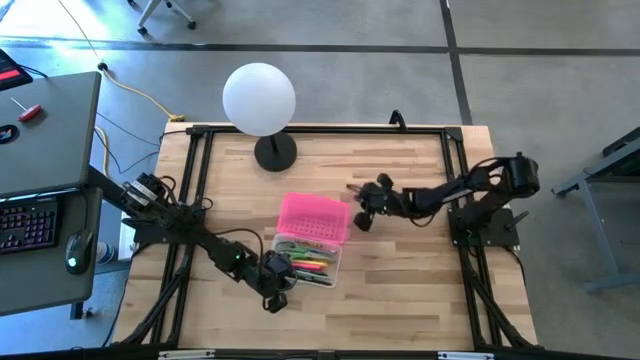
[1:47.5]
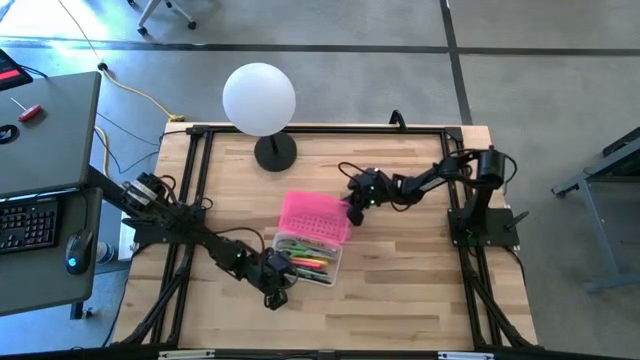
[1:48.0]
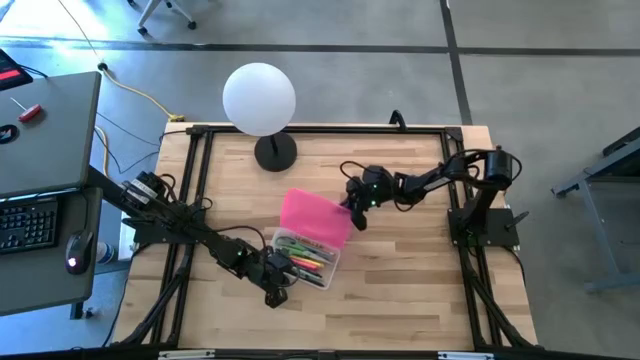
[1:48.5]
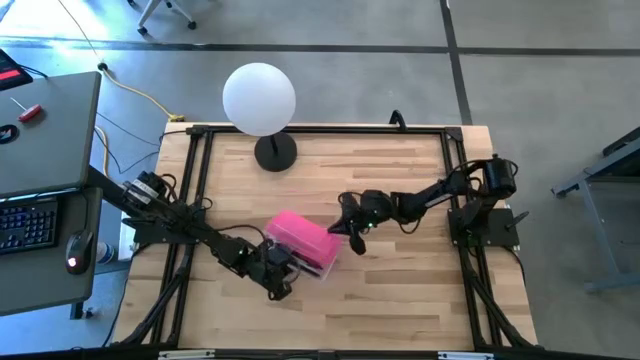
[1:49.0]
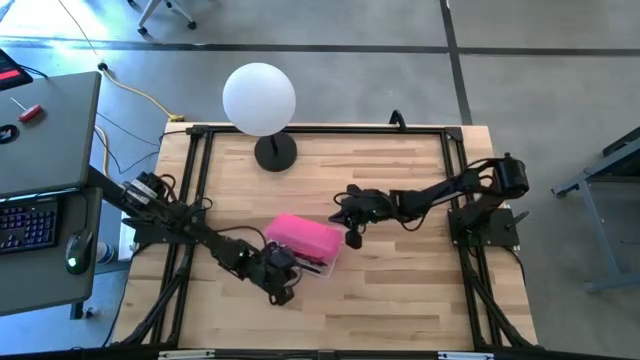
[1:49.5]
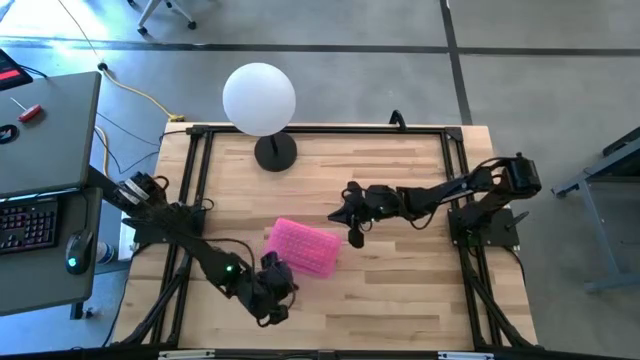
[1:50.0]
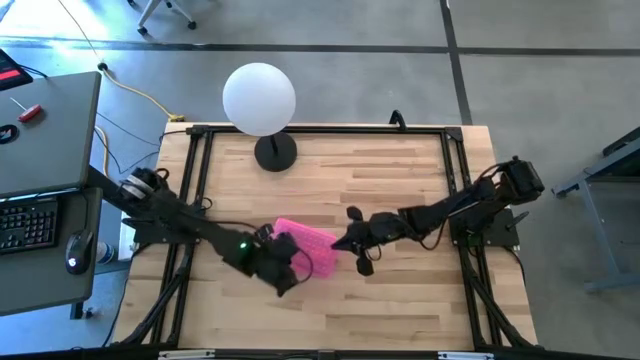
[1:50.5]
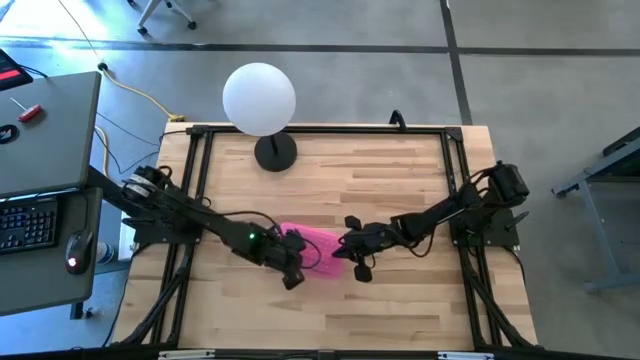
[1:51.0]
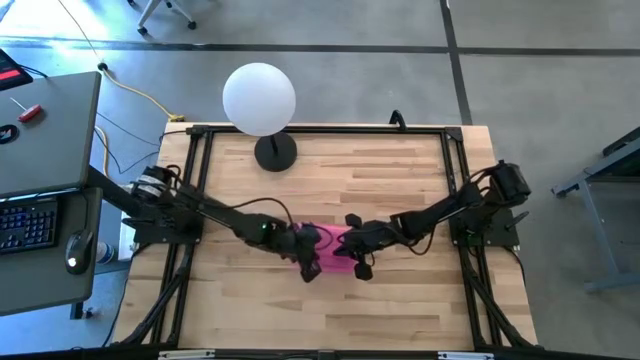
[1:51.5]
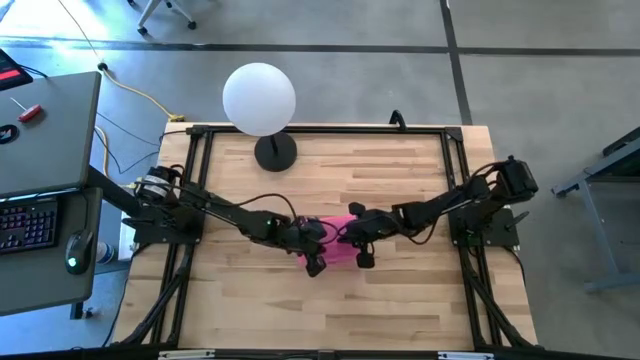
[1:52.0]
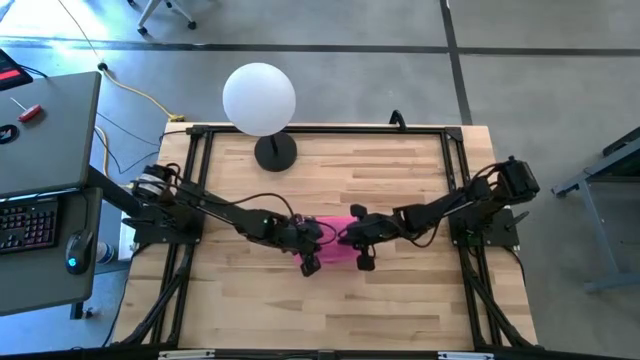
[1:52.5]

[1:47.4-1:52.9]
Task: Pick & place school supplies into a supply box
Close the pink supply box

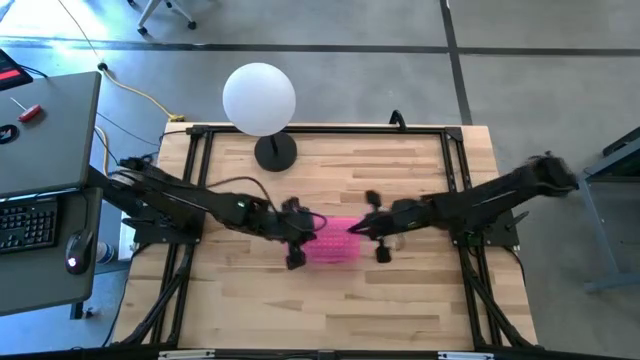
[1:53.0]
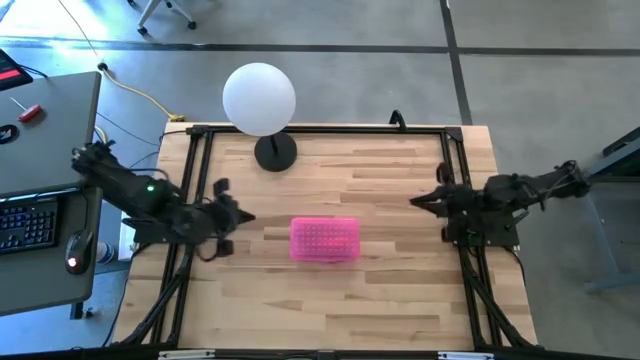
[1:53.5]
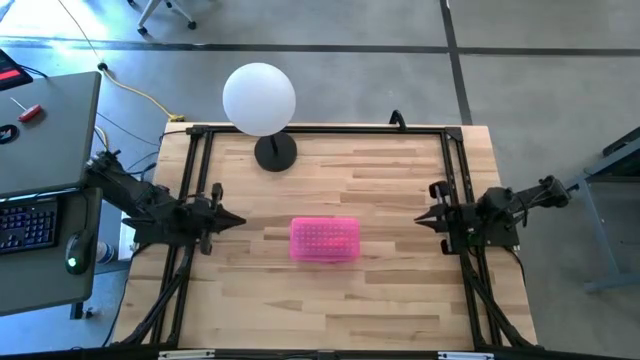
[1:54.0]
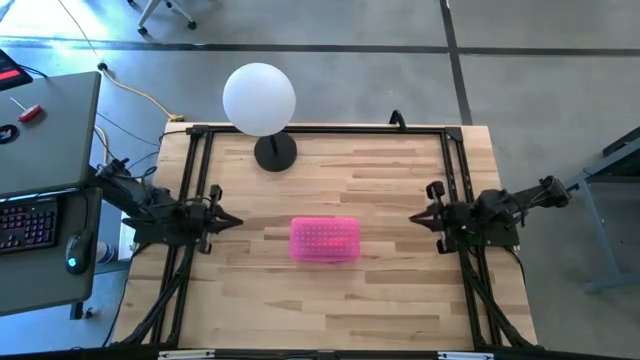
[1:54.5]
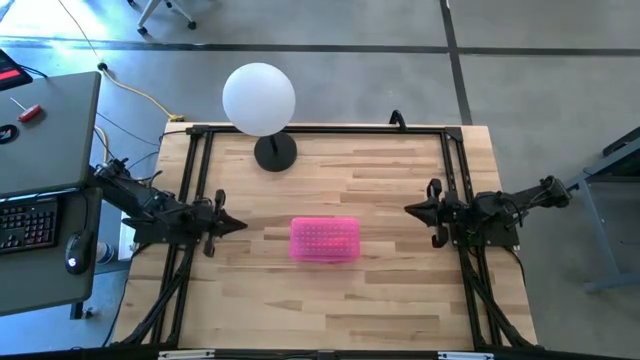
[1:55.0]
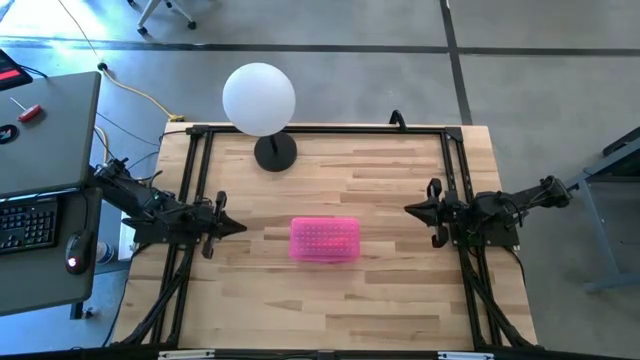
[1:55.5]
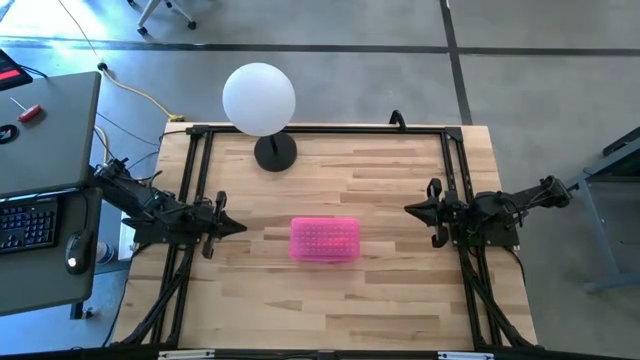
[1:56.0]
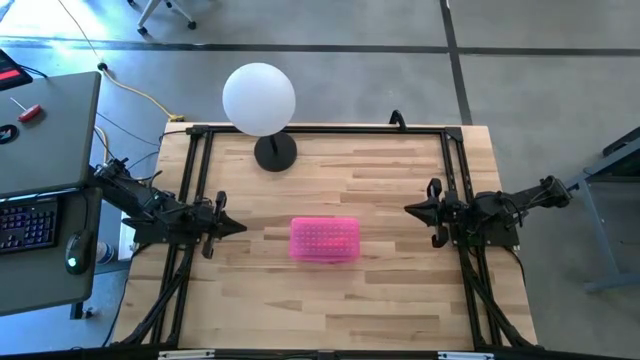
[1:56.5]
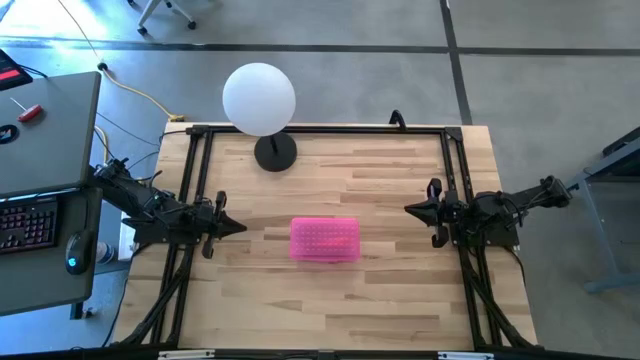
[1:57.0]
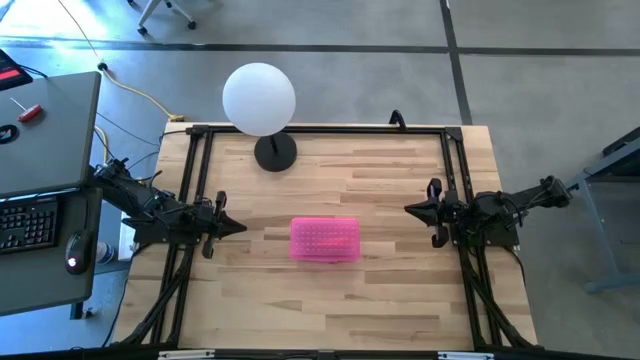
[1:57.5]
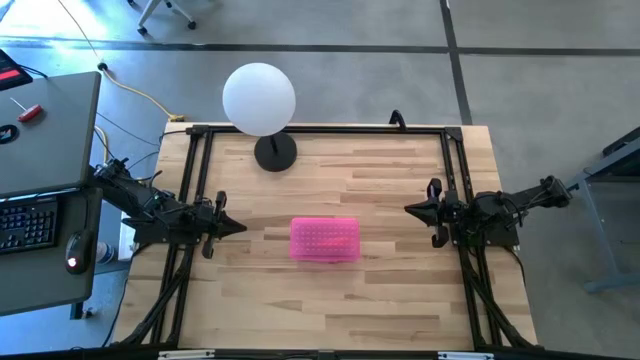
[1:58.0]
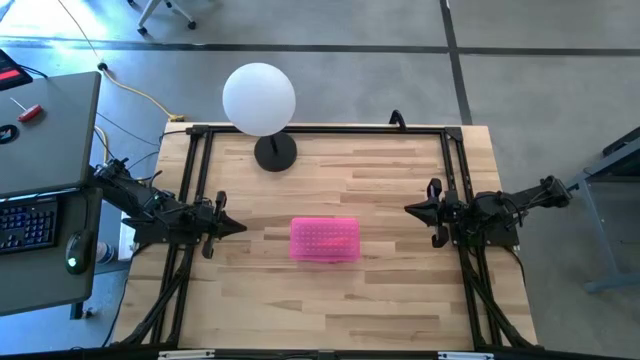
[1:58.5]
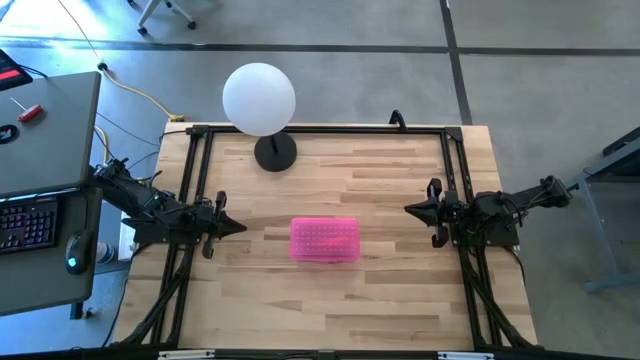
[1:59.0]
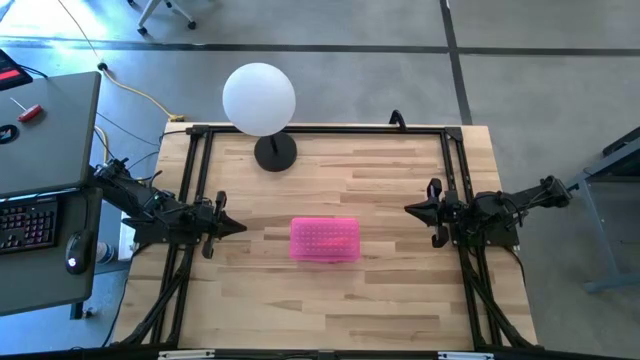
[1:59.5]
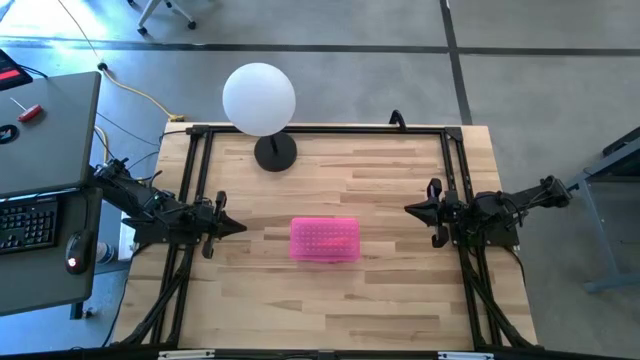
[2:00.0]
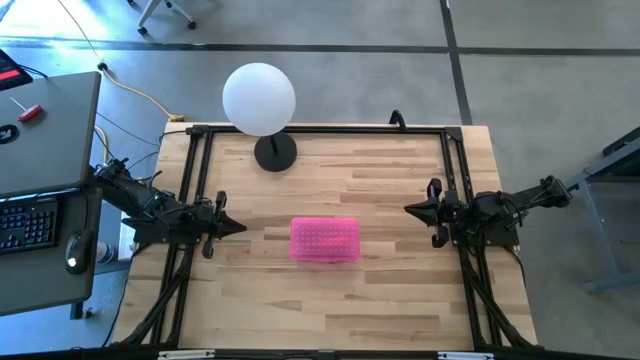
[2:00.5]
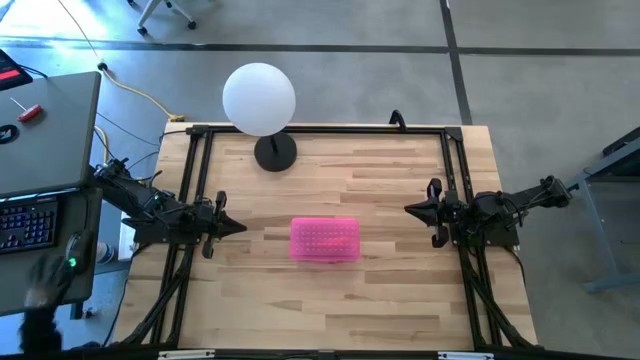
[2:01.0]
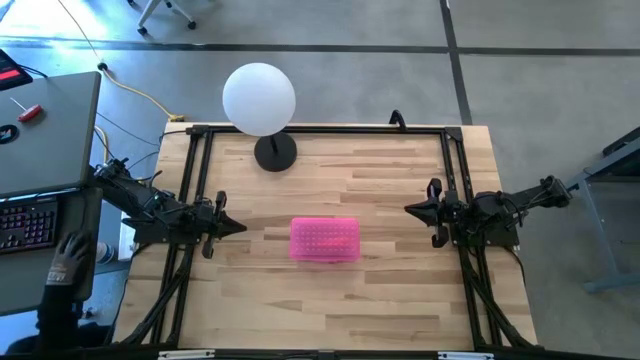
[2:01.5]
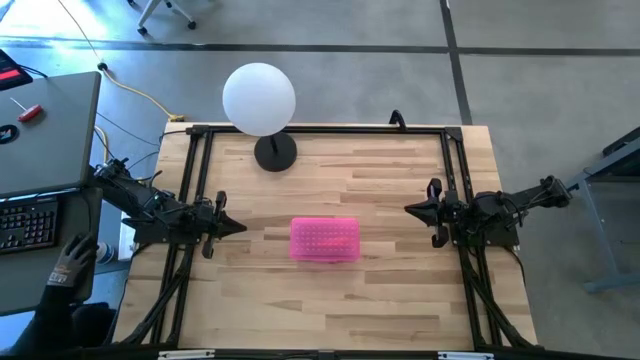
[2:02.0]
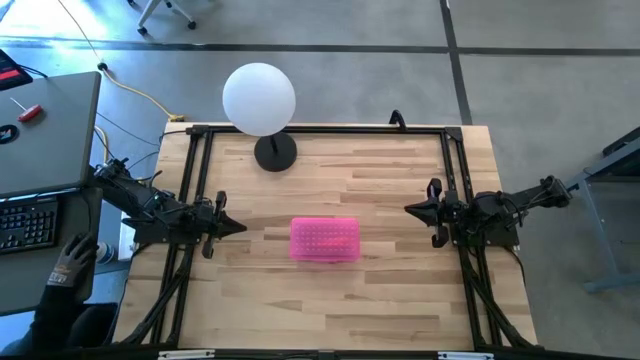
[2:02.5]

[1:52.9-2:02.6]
Return to Home Position

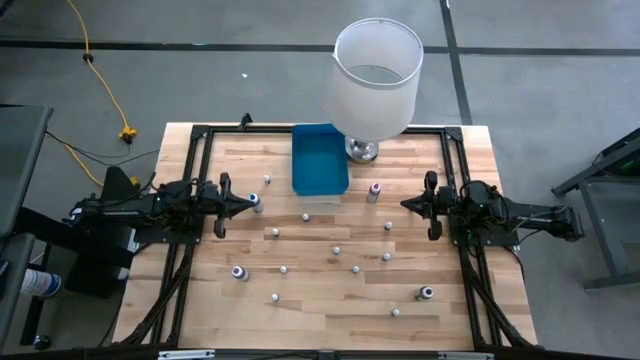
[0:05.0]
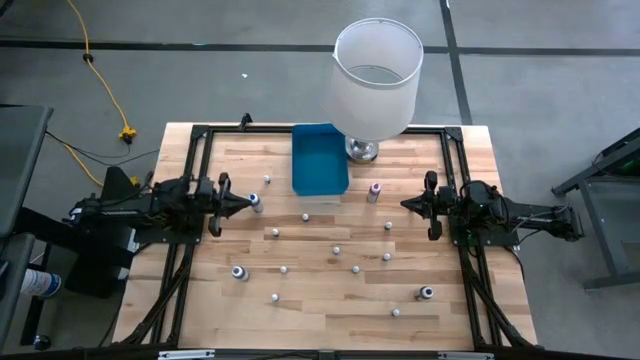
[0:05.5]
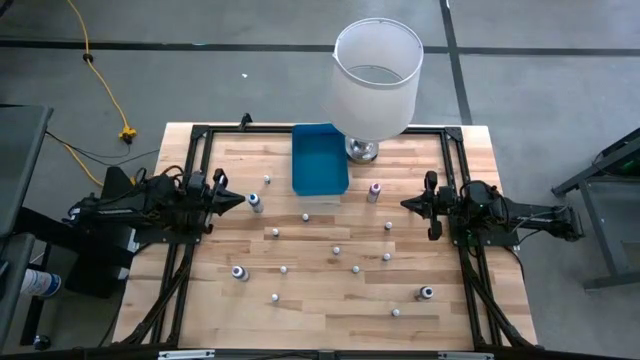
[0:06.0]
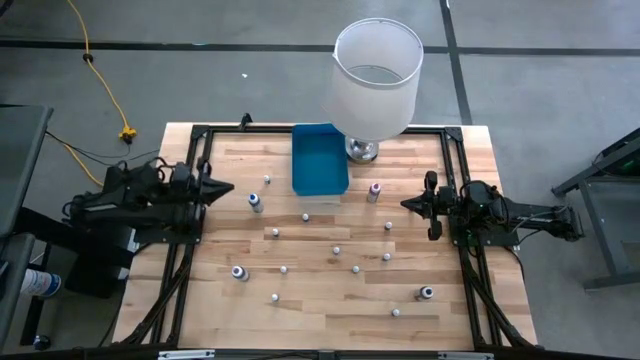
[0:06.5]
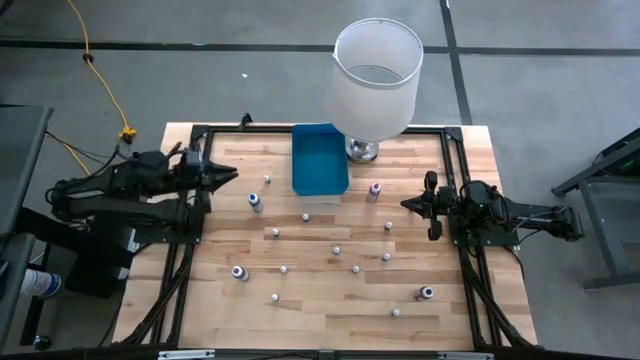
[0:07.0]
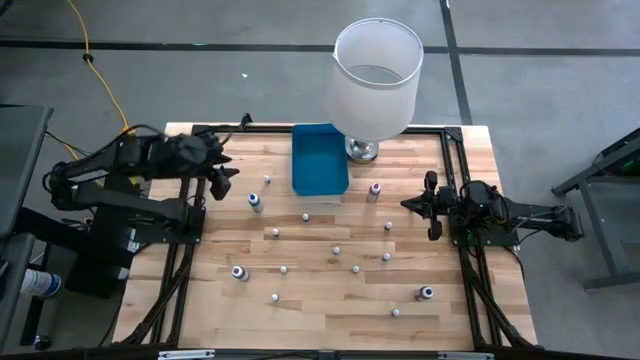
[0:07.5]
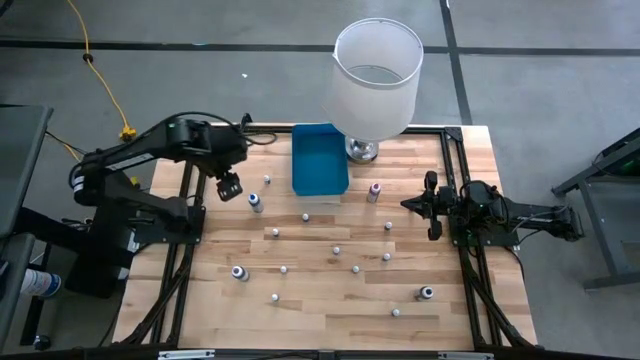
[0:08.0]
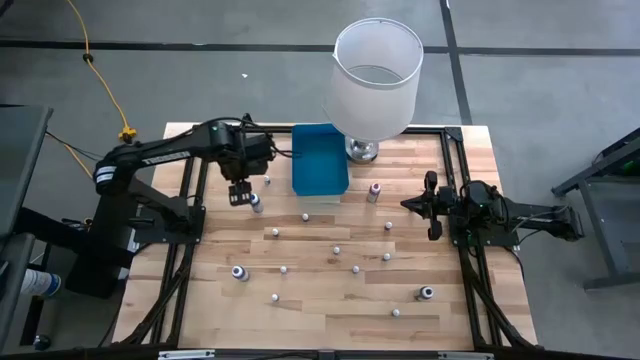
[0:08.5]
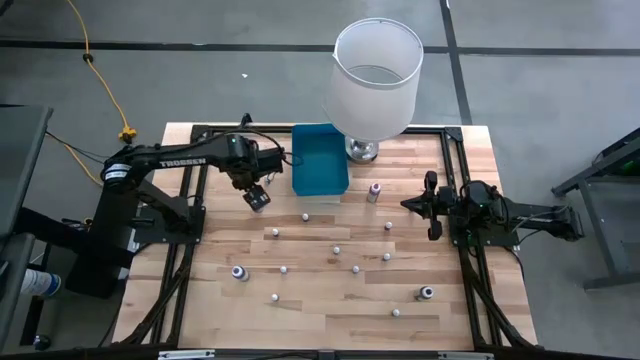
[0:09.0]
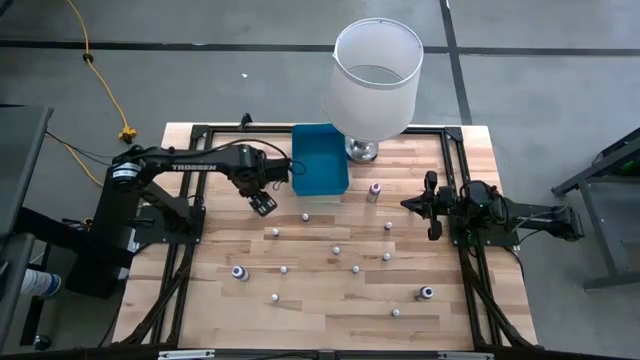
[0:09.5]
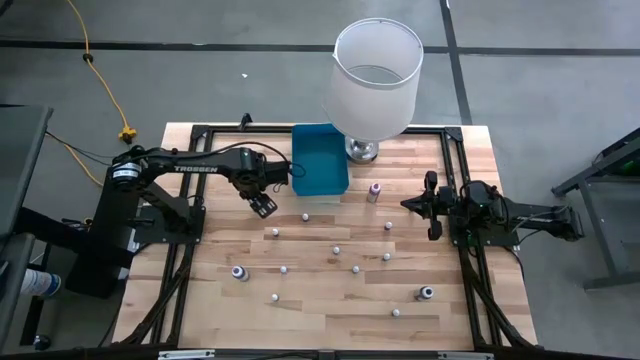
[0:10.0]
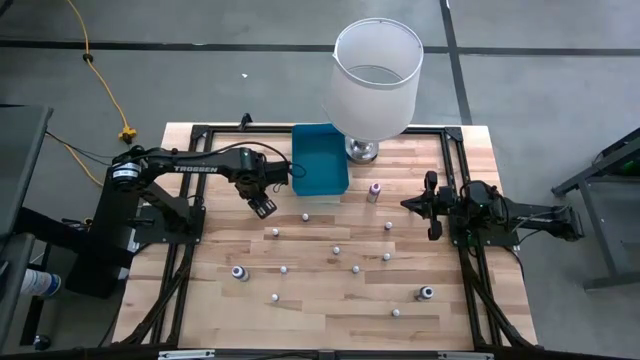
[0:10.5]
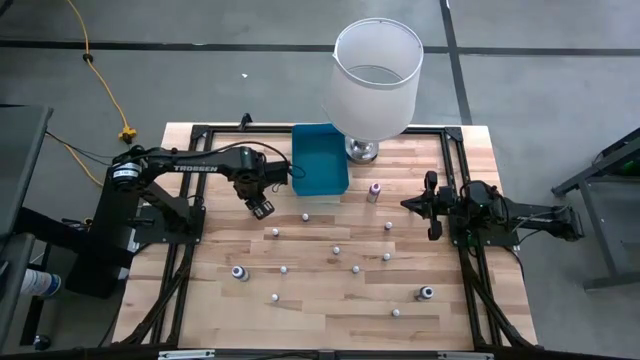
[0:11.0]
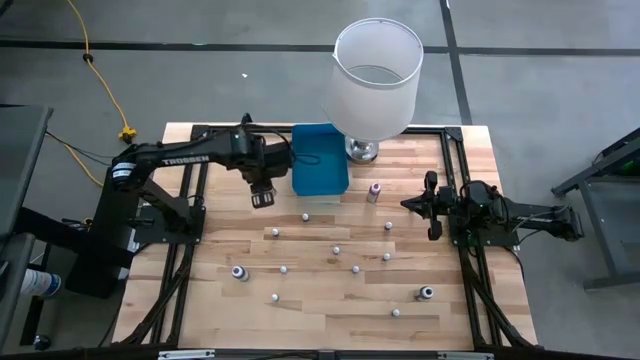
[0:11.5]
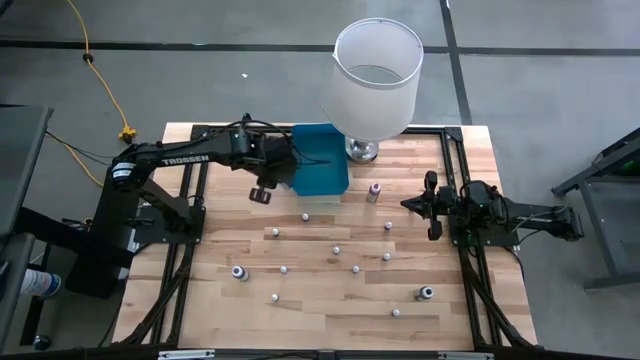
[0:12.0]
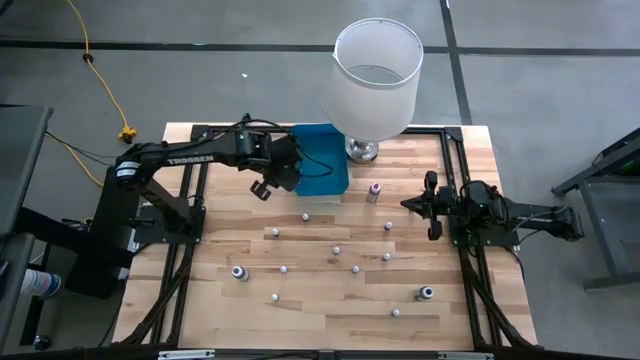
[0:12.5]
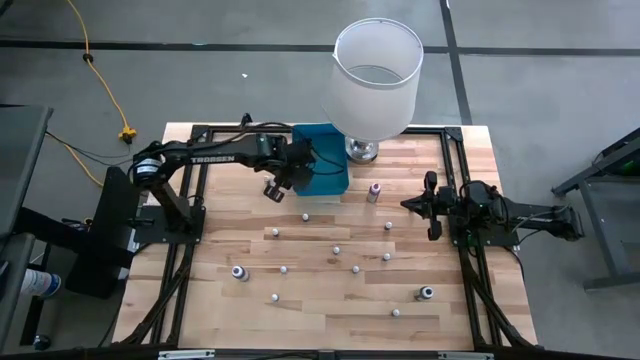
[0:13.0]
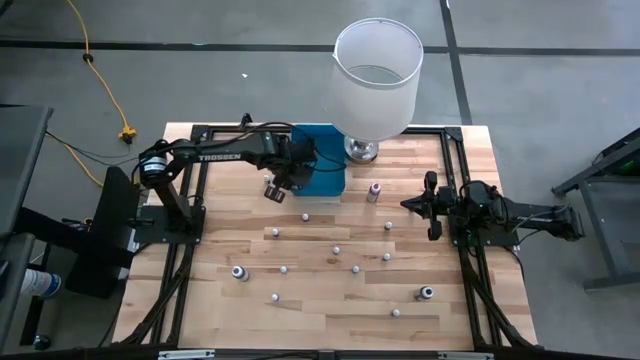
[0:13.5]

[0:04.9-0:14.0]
Task: Pick & Place food coloring
Put the big blue food coloring bottle into the blue bin
